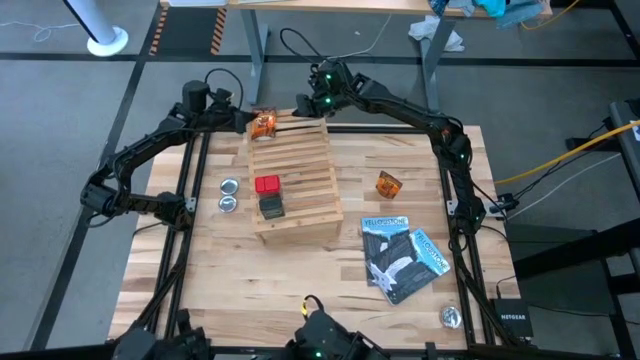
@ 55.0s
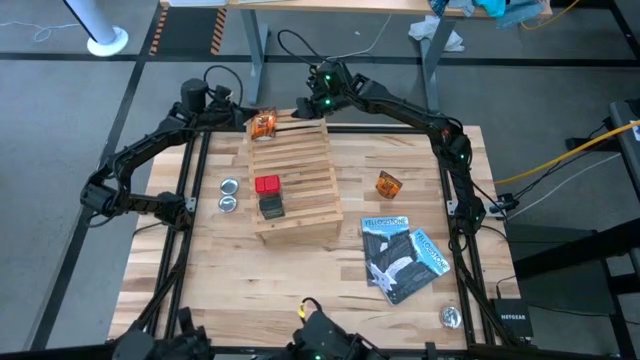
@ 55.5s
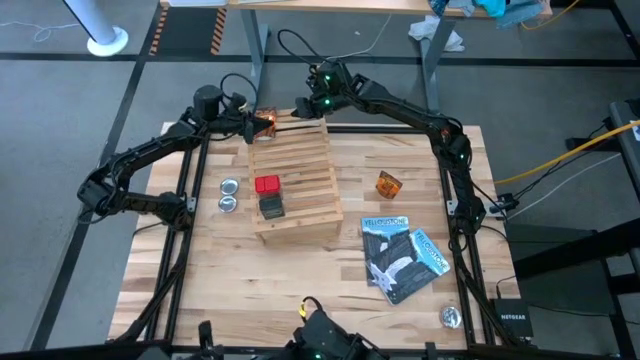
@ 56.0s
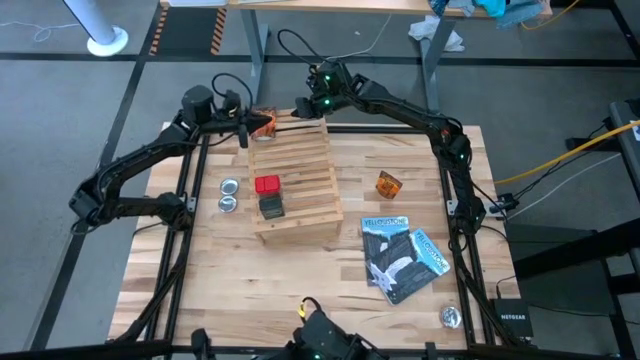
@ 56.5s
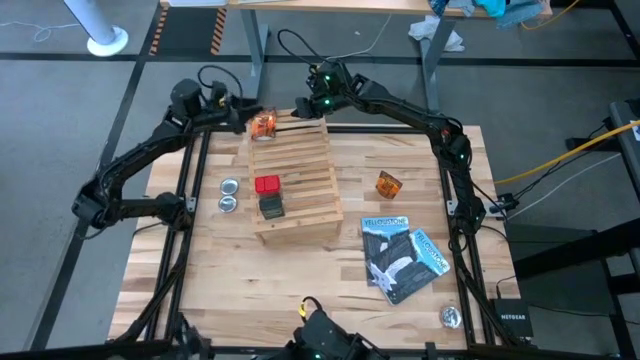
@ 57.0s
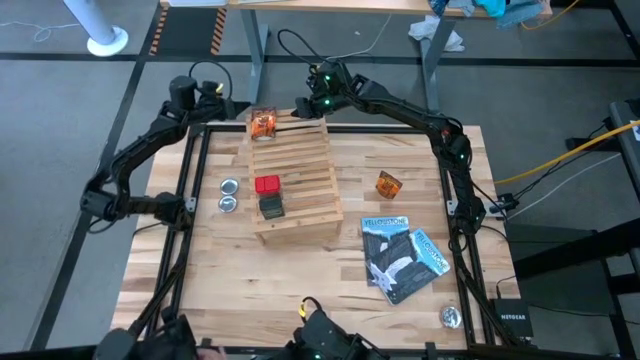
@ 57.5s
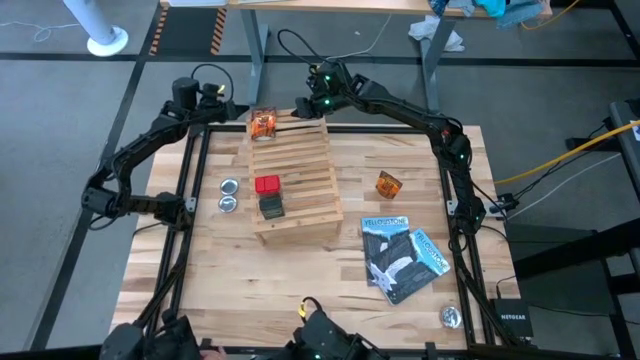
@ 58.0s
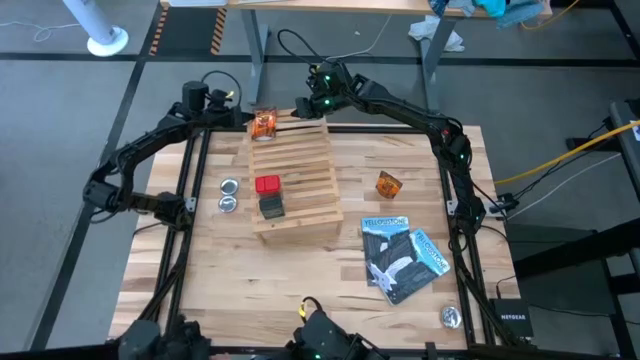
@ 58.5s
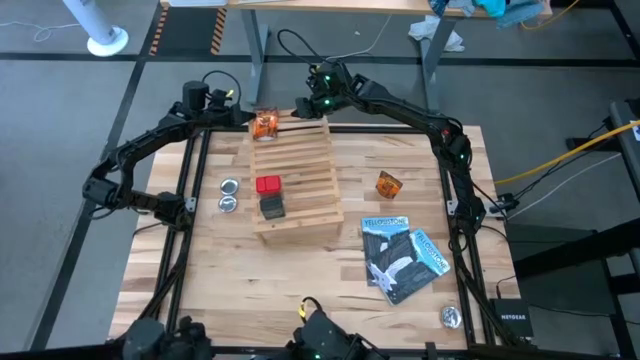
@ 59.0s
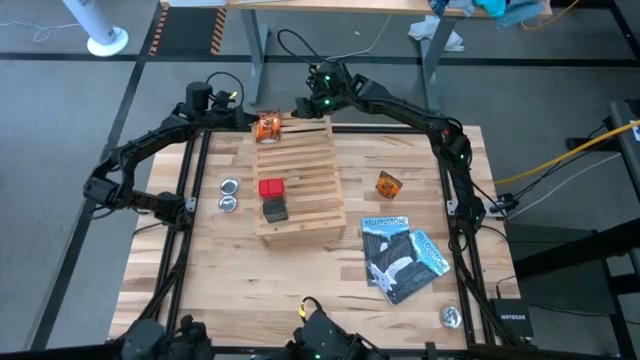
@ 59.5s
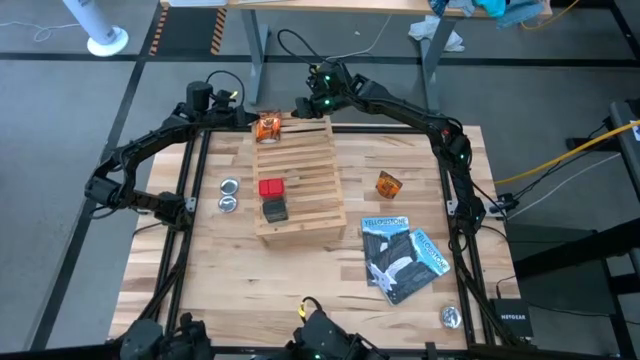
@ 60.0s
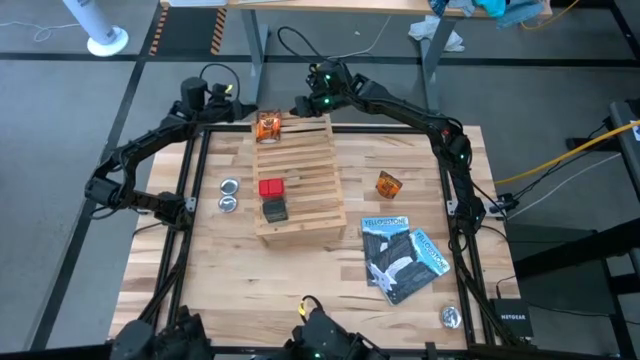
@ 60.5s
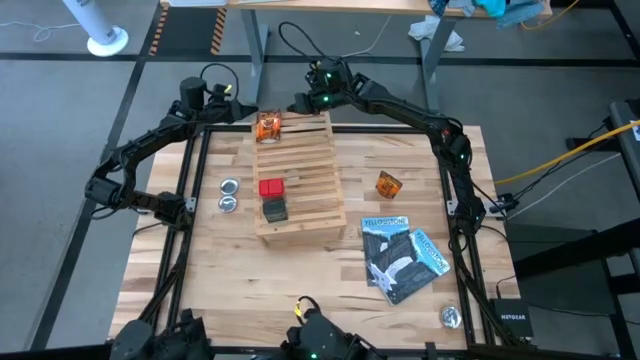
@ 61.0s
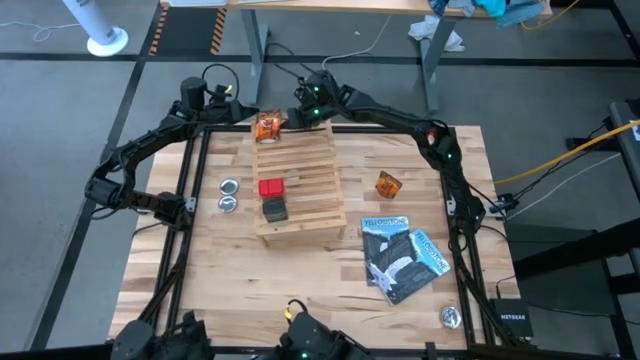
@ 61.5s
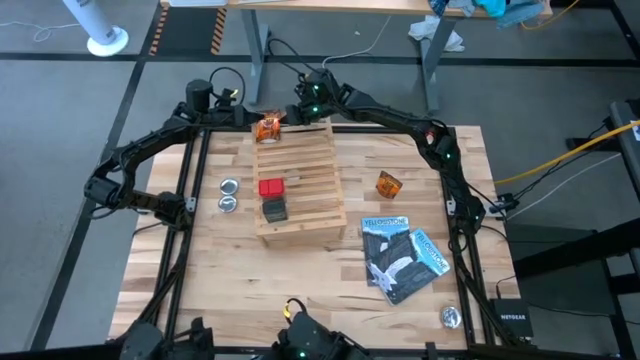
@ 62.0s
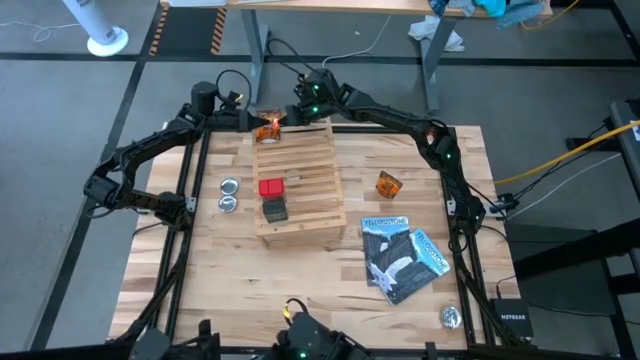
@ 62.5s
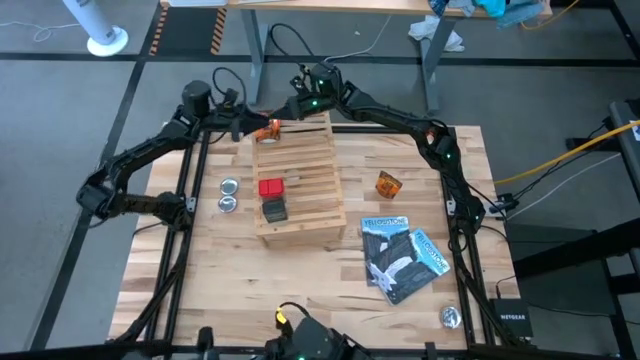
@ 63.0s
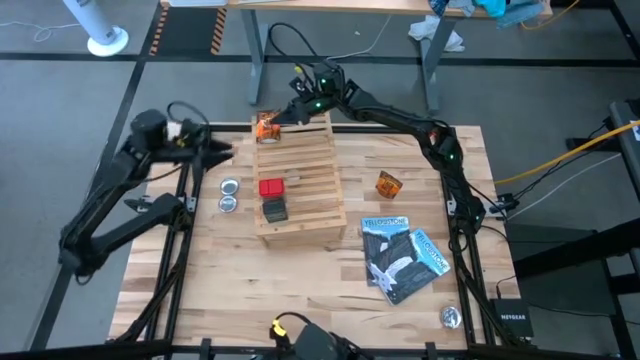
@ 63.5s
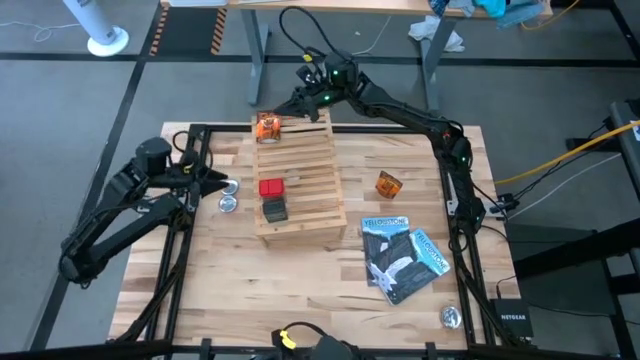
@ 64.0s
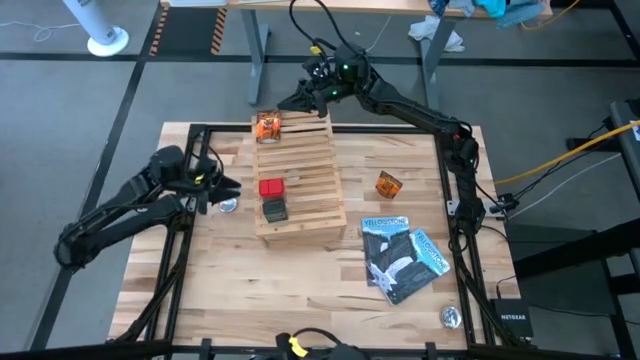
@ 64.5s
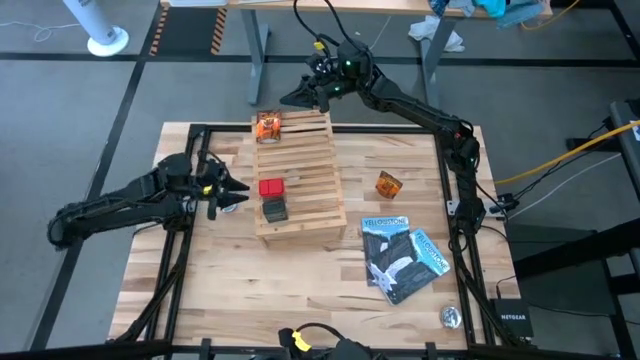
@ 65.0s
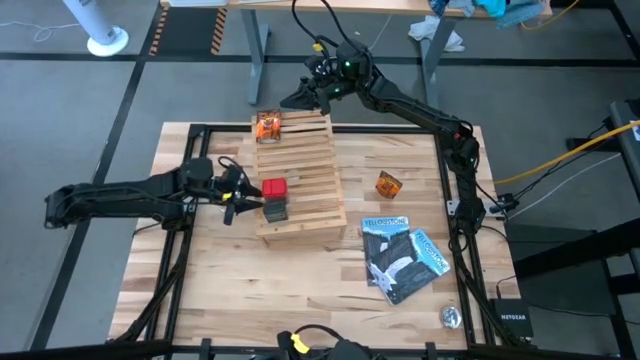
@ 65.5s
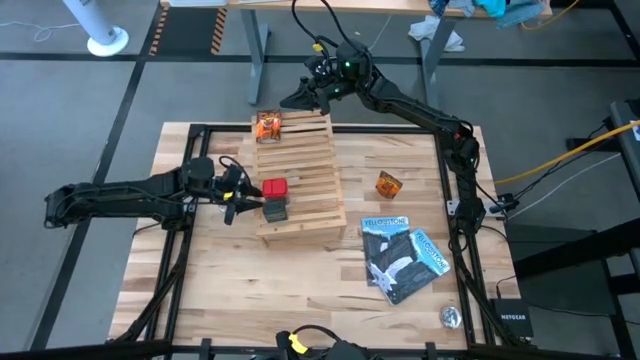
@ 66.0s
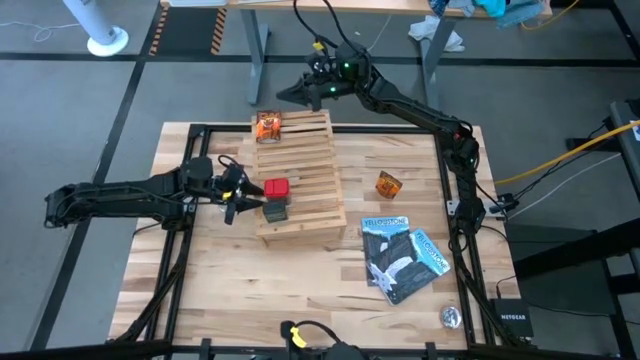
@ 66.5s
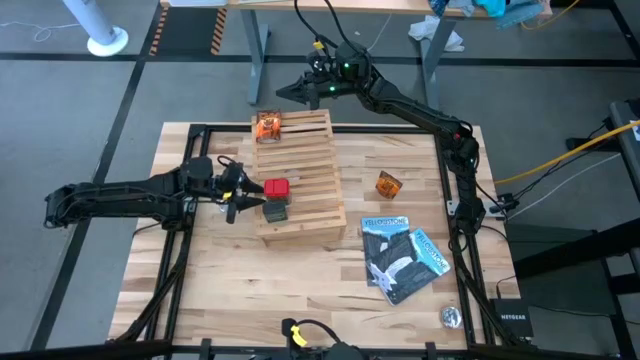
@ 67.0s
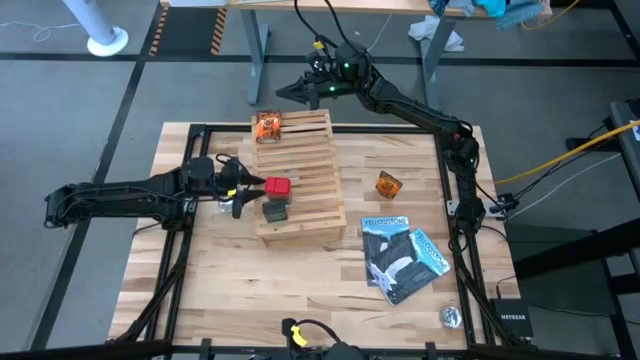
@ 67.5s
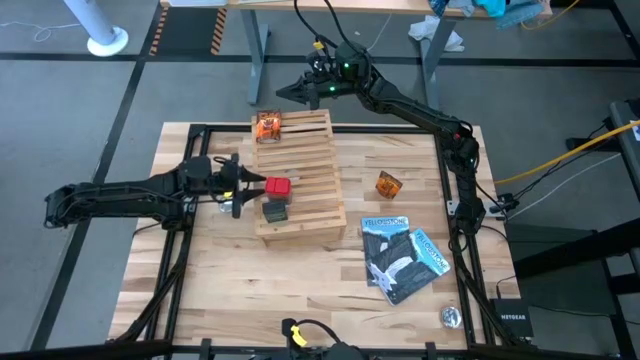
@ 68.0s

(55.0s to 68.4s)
Task: Shelf spices
Adjust the red seasoning can

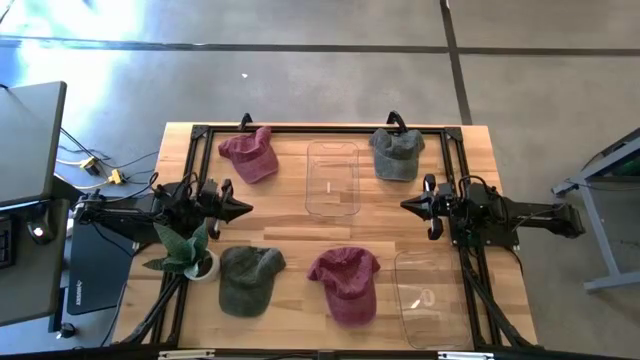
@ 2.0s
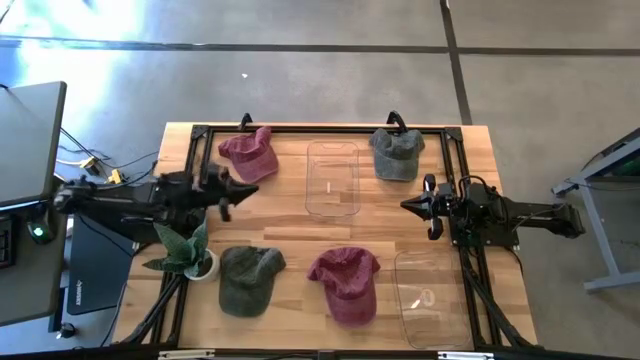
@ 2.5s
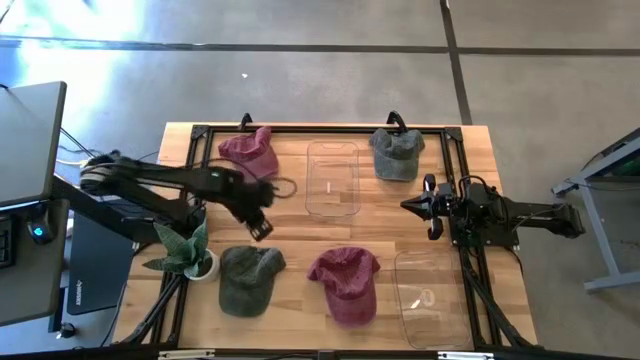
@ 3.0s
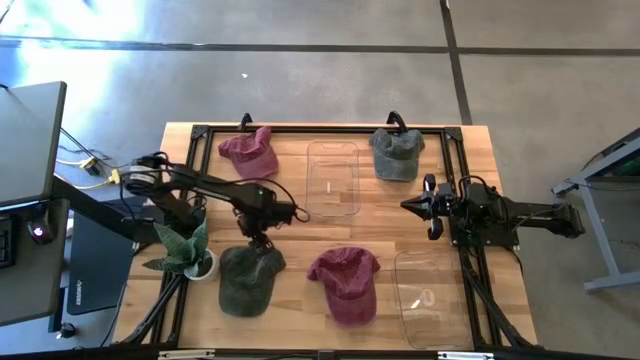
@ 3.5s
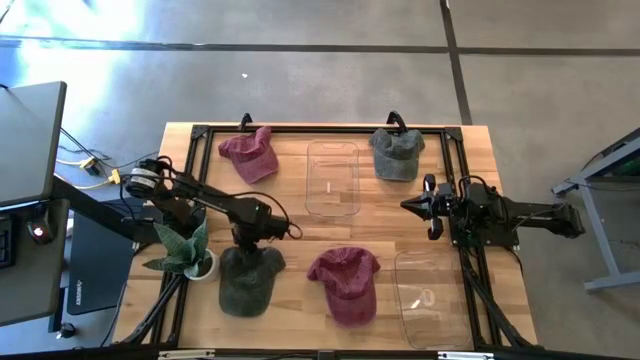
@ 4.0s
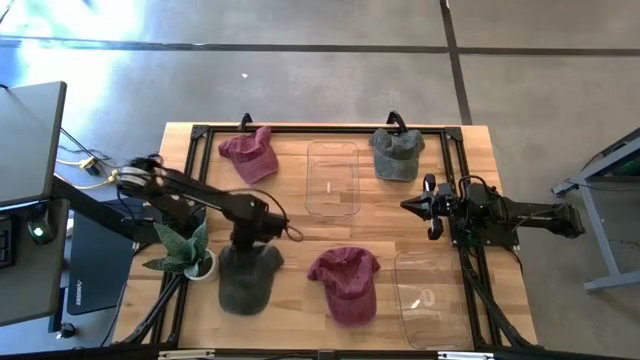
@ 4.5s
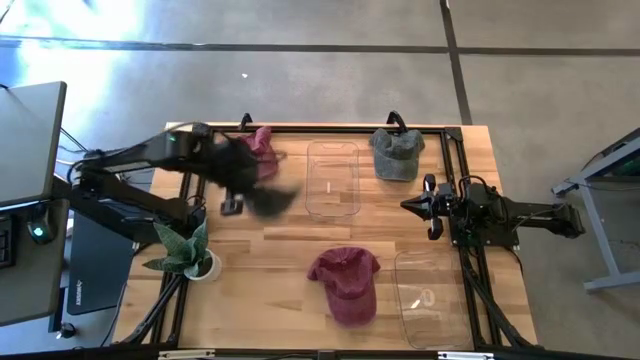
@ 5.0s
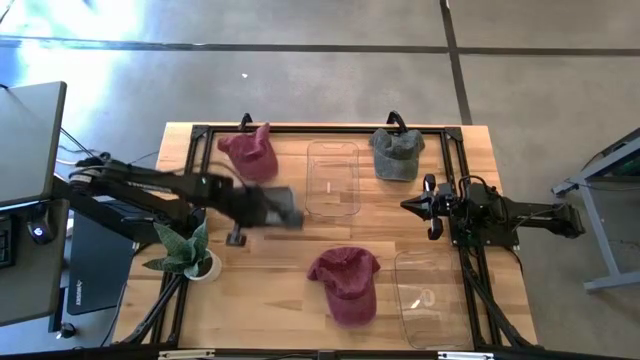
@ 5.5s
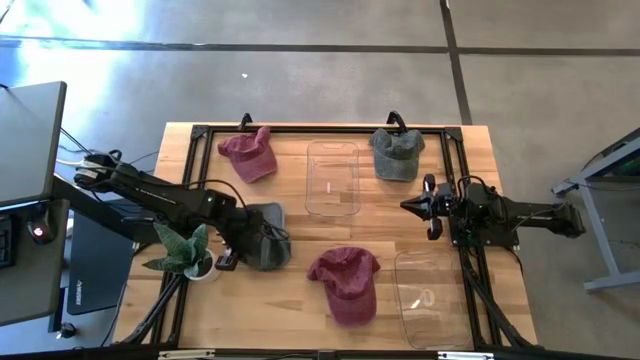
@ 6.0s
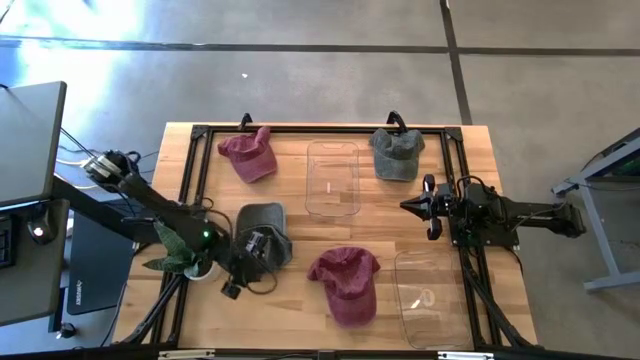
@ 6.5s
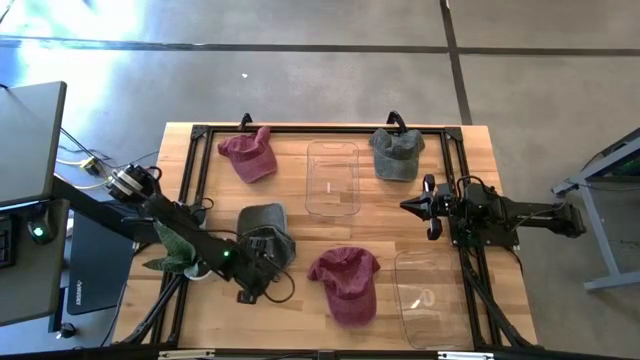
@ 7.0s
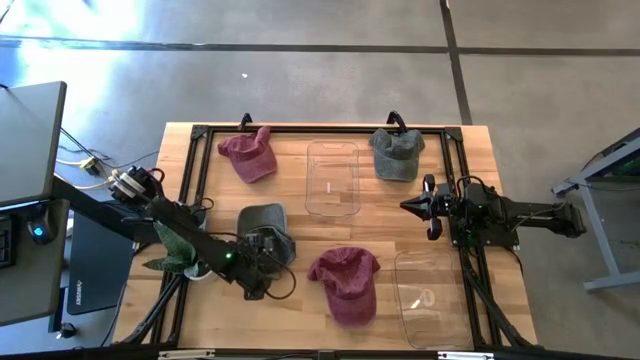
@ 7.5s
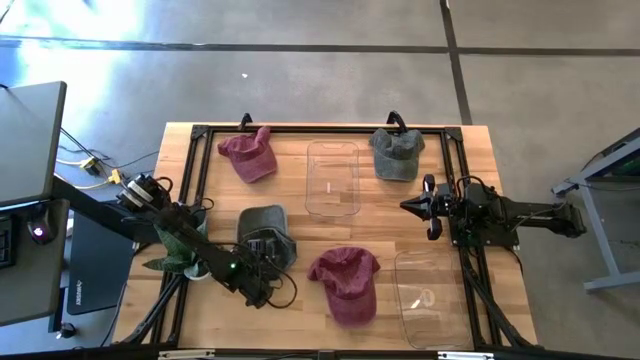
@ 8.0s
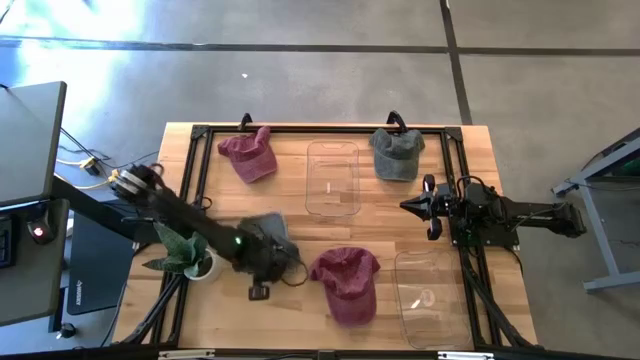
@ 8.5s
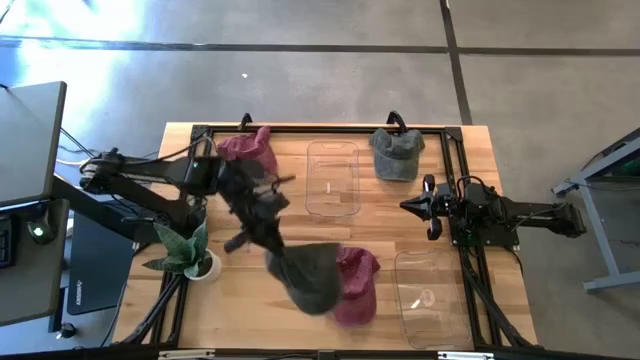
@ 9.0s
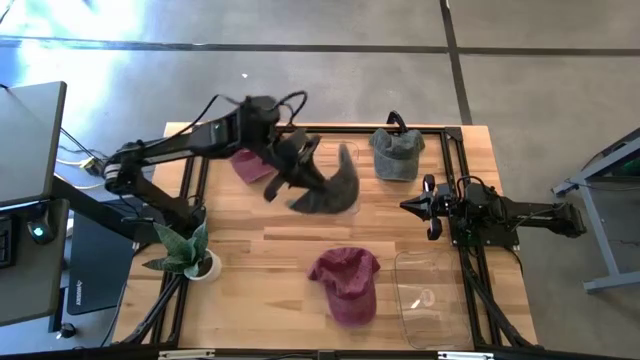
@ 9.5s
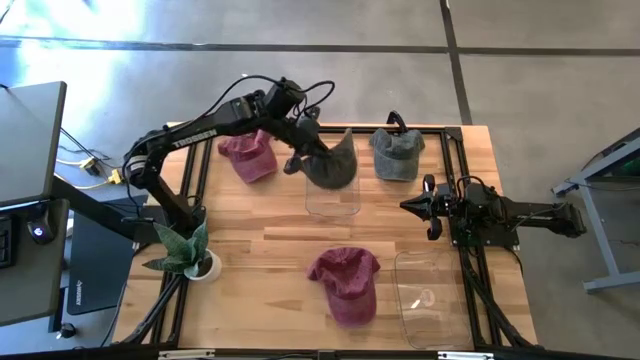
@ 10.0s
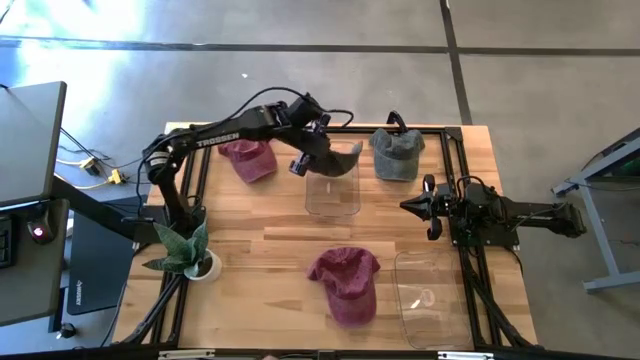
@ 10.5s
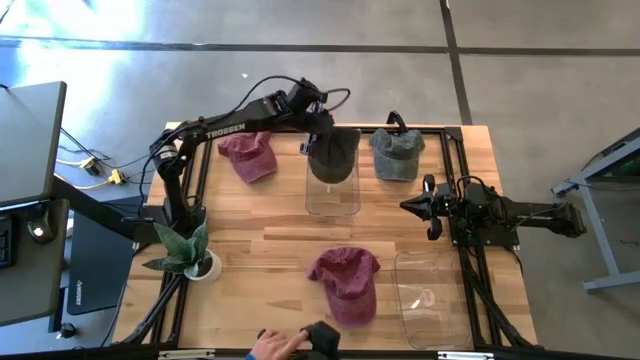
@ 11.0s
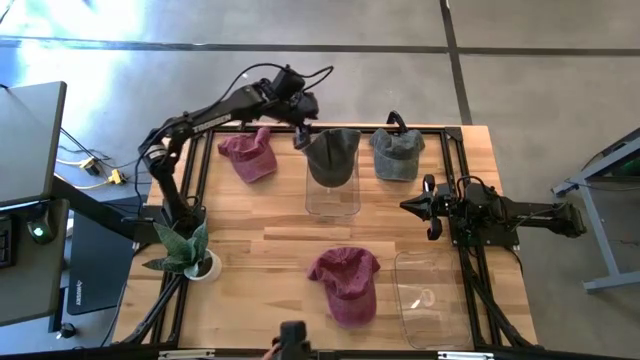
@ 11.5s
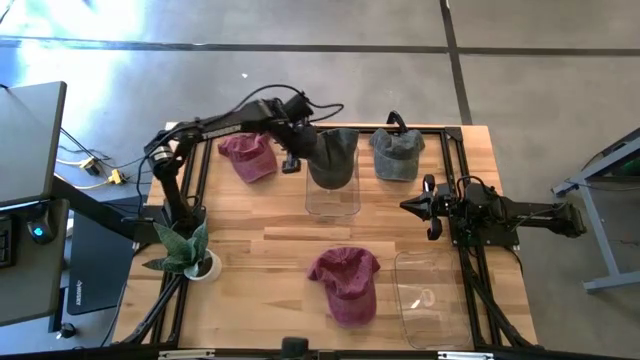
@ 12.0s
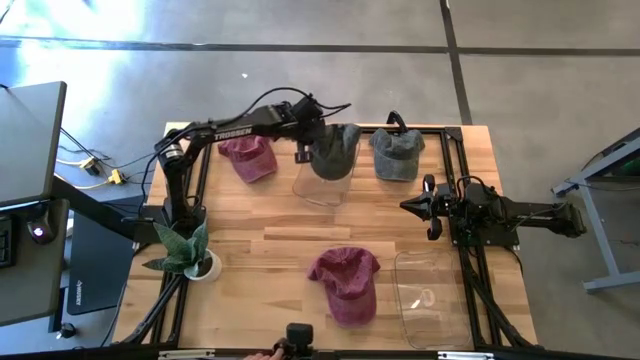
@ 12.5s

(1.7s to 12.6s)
Task: Pick & Place hat
Put the bottom black cap into the top transparent bin
